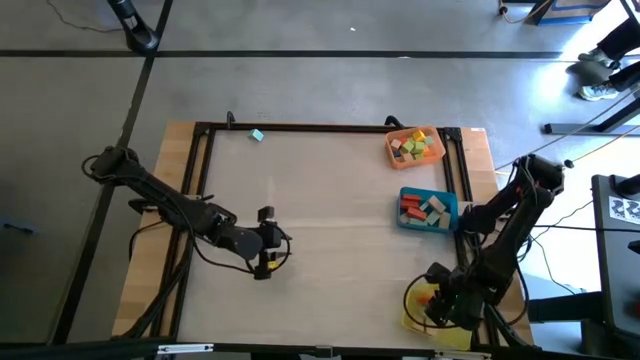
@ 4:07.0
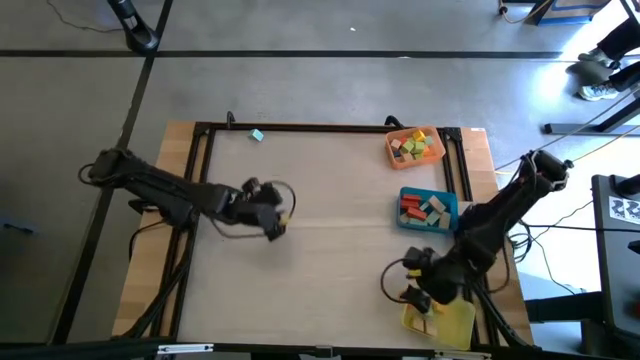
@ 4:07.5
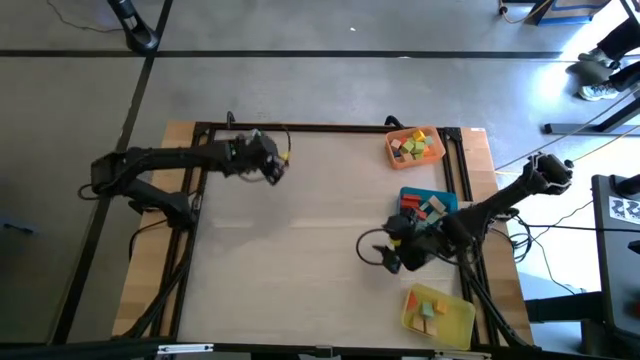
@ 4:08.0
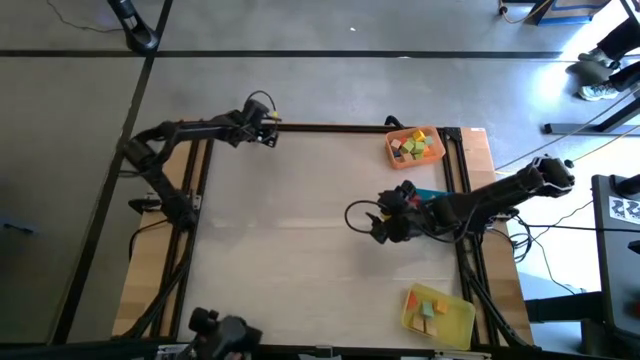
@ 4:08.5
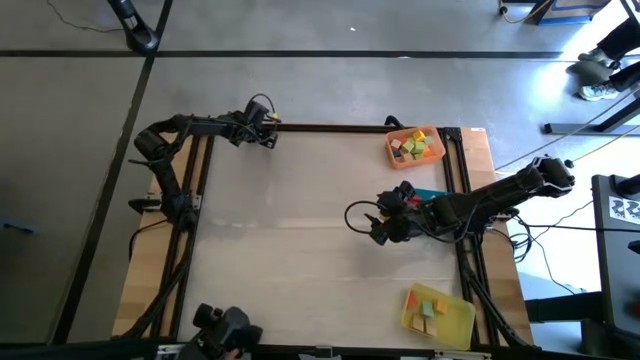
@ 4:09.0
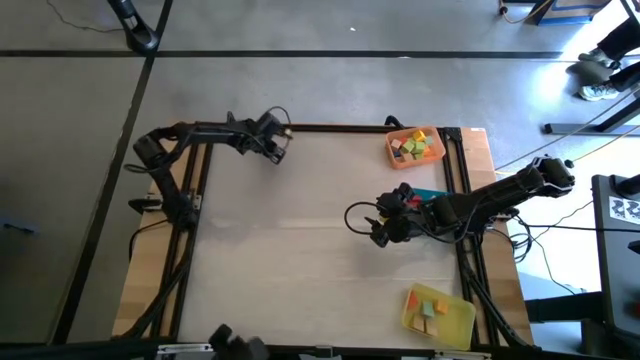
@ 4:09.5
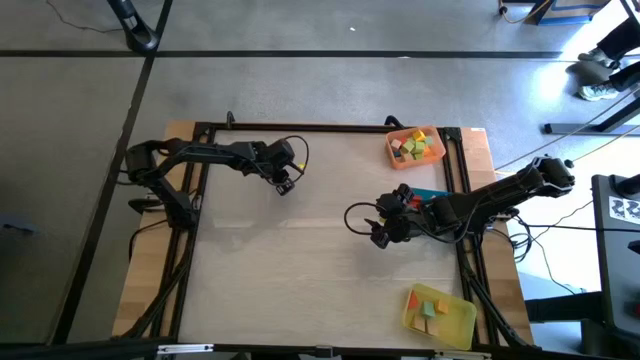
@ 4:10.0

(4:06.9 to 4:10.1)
Task: Sort blocks by size
Put the light blue triangular block into the yellow bin

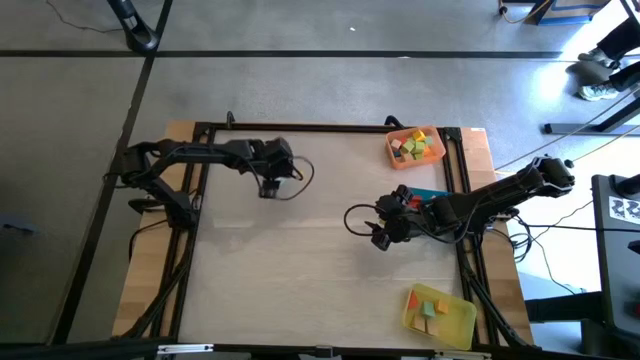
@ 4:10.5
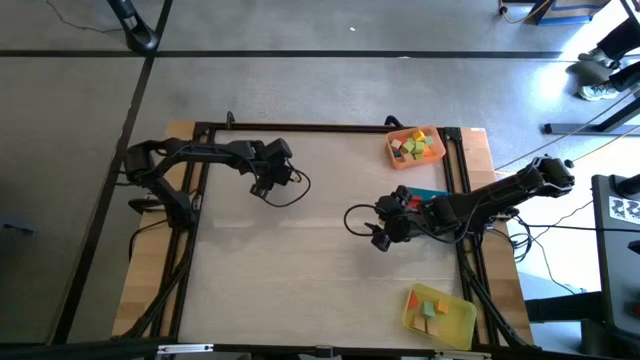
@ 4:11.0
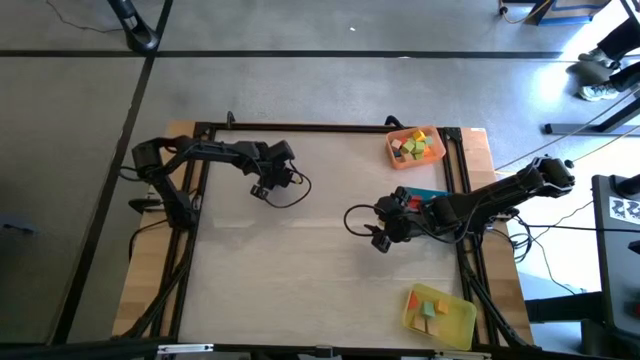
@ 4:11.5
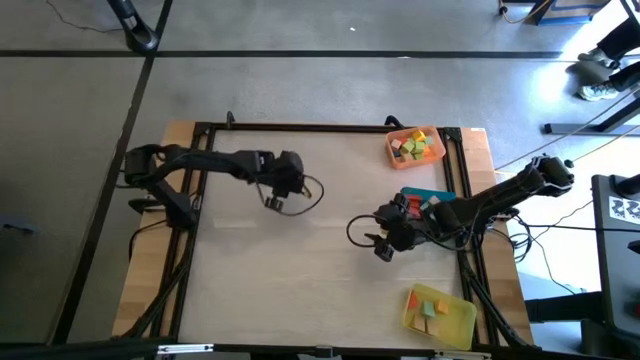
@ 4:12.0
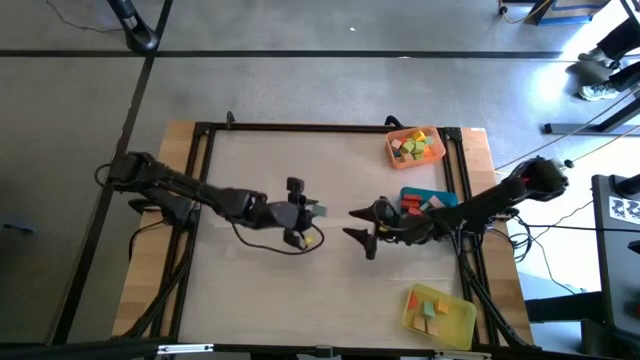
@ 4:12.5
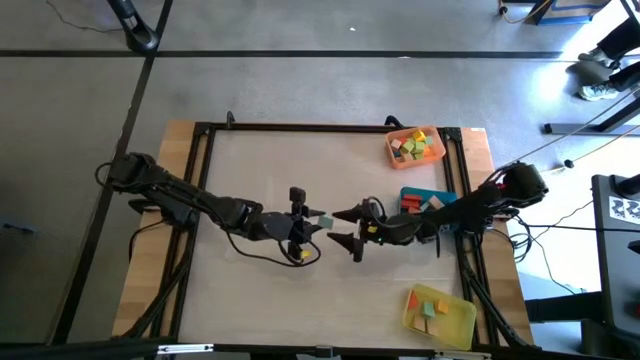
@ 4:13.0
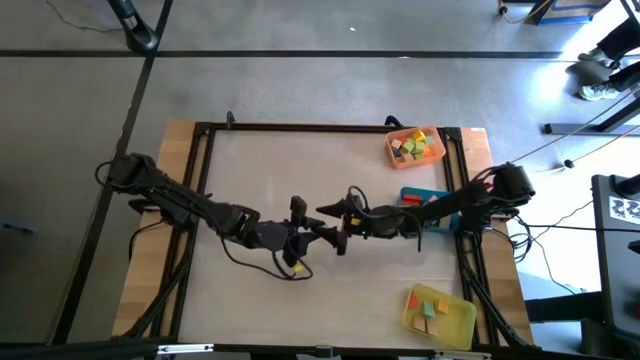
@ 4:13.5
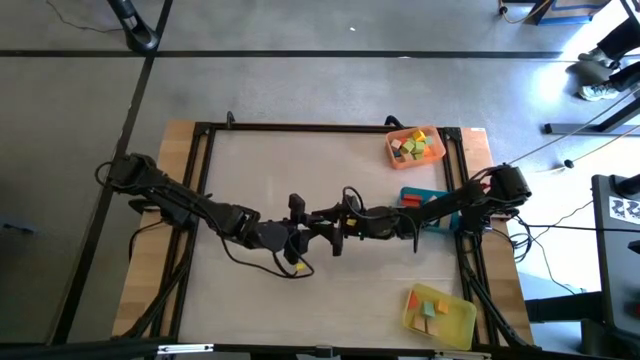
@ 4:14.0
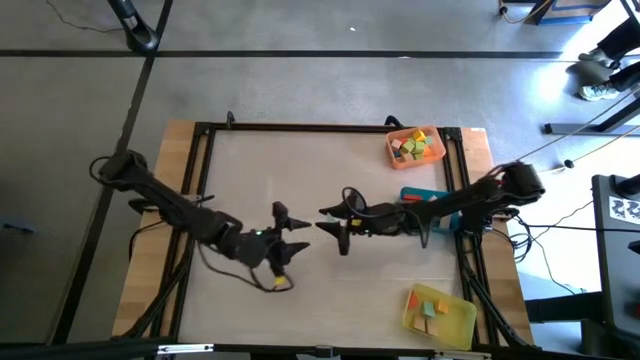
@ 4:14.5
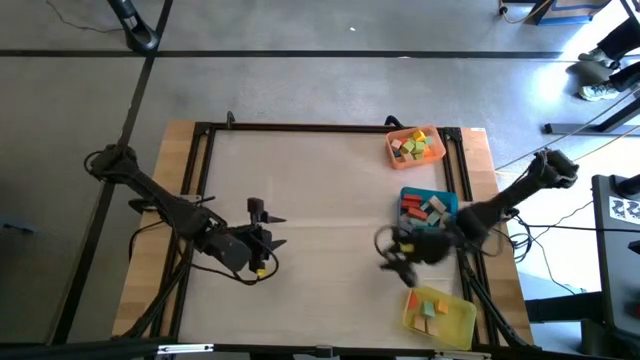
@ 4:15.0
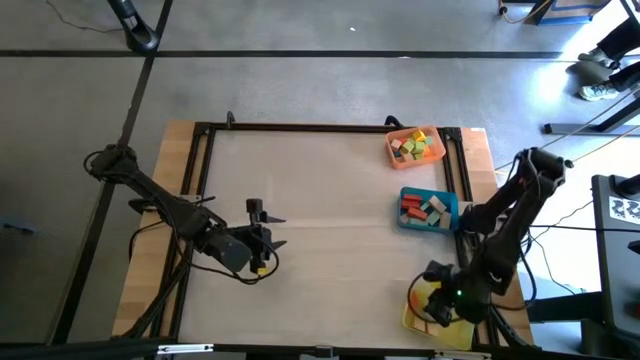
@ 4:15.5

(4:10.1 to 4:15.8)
Put the light blue triangular block into the yellow bin

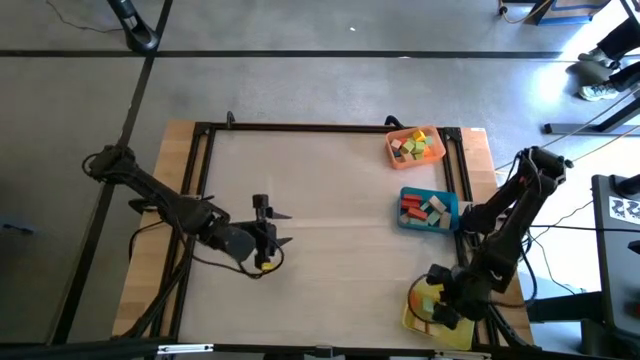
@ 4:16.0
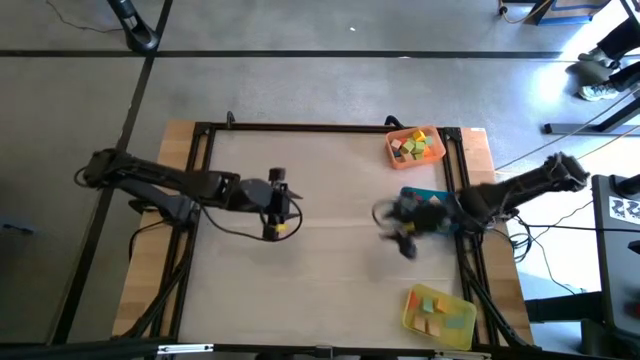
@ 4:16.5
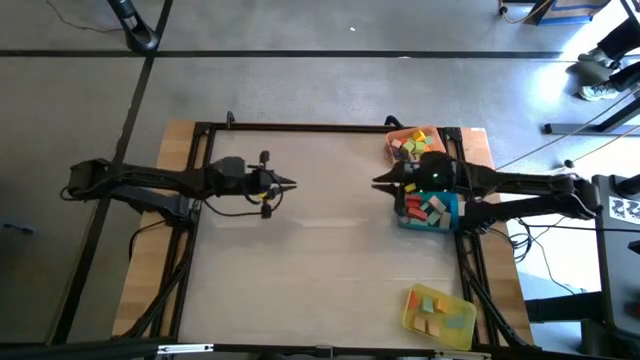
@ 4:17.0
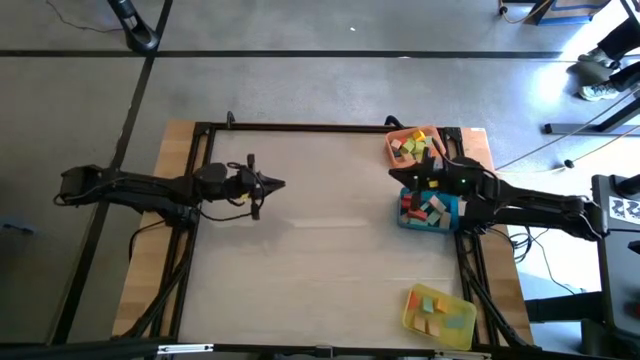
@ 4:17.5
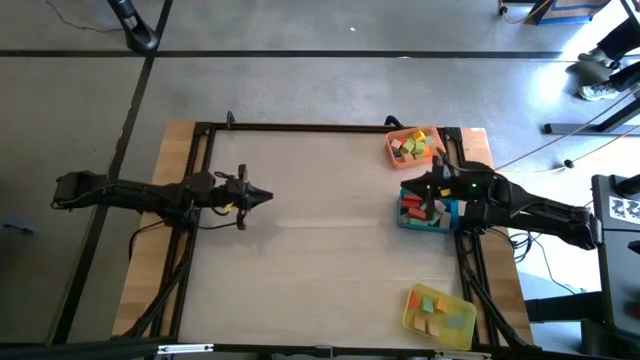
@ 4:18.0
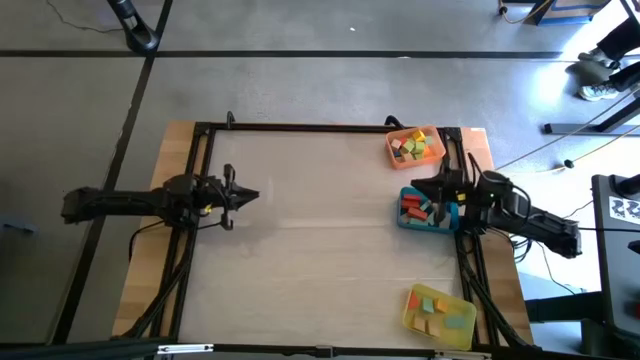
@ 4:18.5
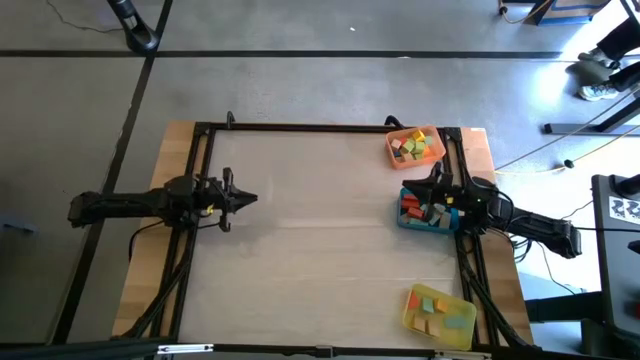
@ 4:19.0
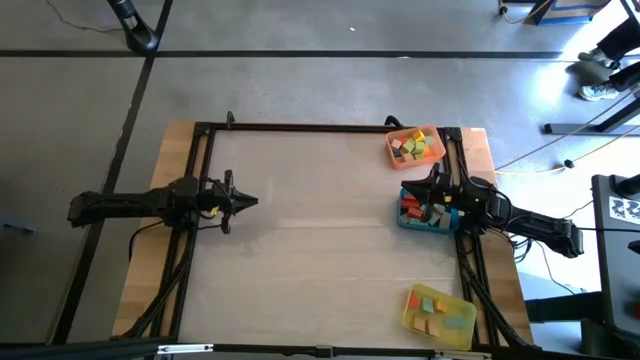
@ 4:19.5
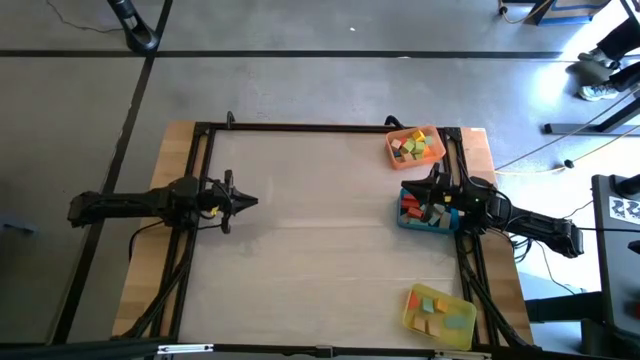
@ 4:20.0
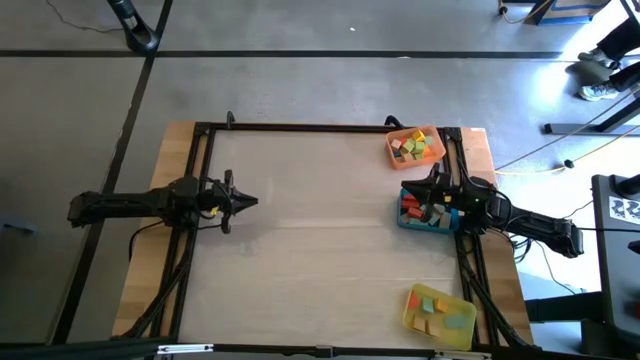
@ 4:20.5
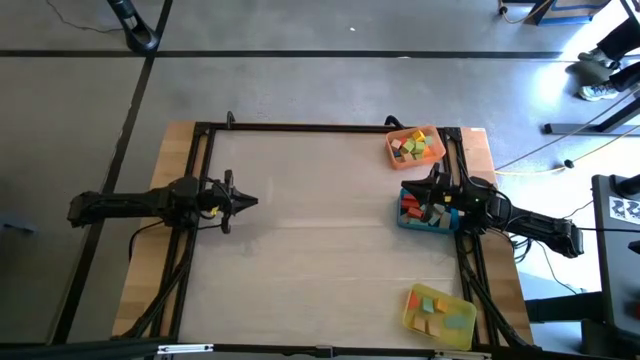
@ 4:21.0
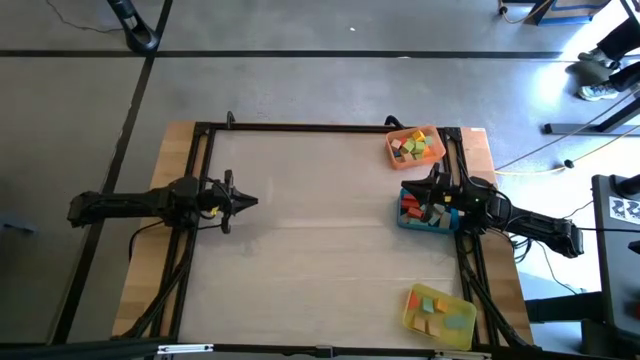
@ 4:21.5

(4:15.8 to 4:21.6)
Return to Home Position

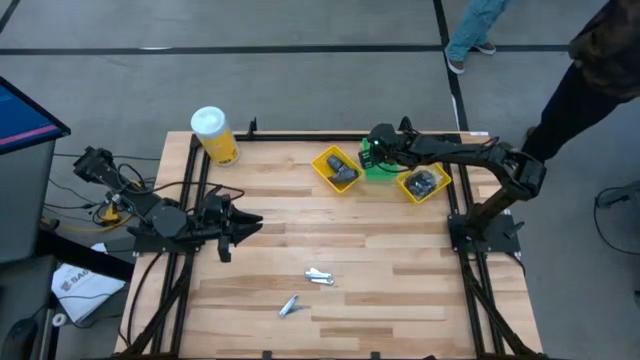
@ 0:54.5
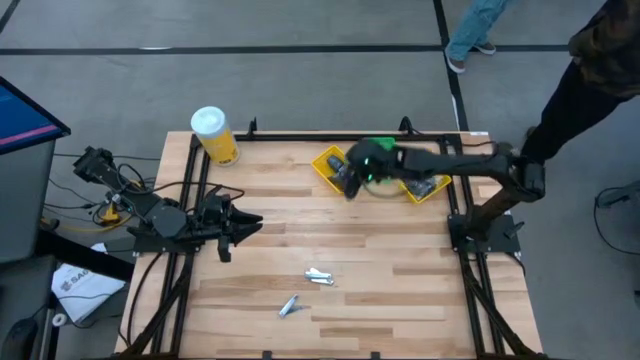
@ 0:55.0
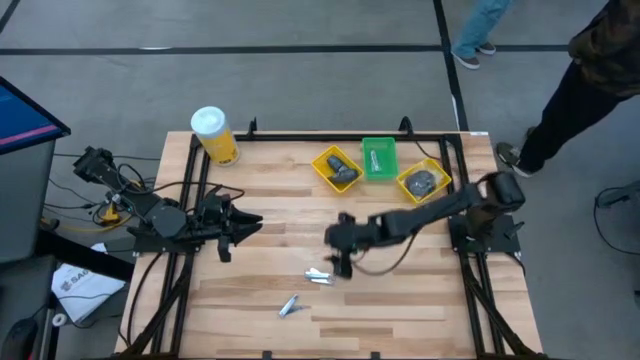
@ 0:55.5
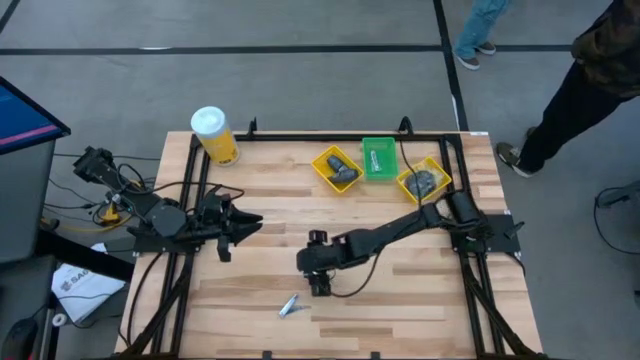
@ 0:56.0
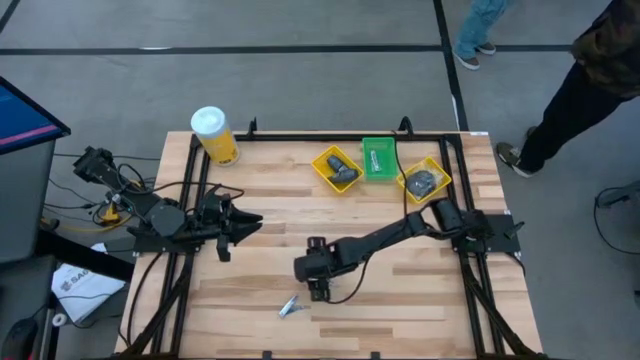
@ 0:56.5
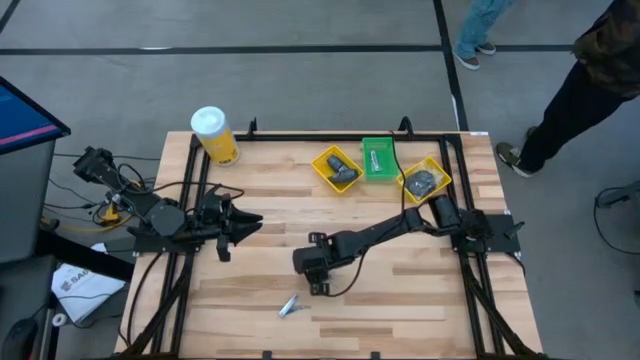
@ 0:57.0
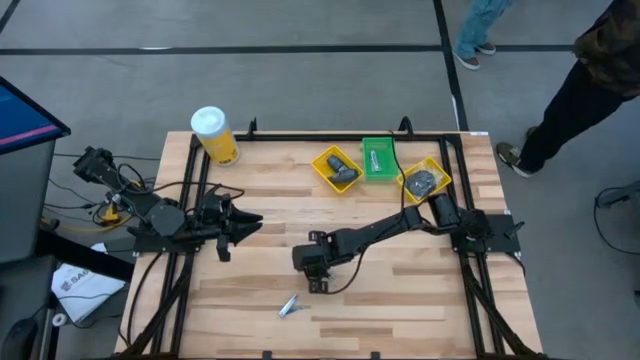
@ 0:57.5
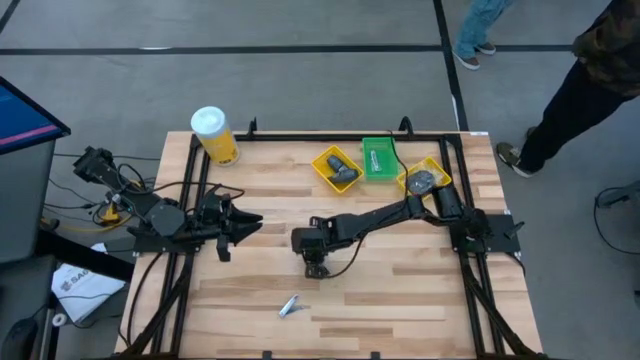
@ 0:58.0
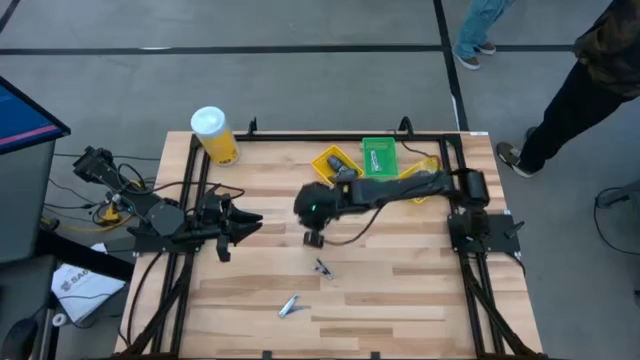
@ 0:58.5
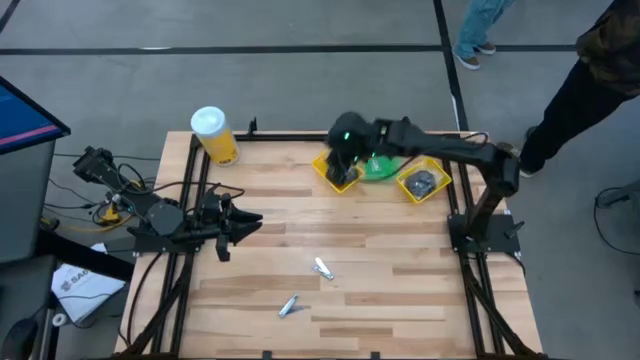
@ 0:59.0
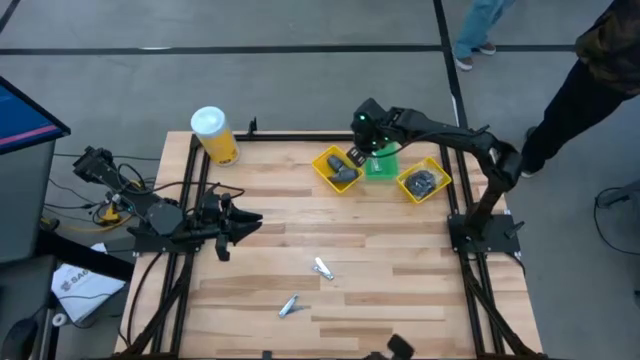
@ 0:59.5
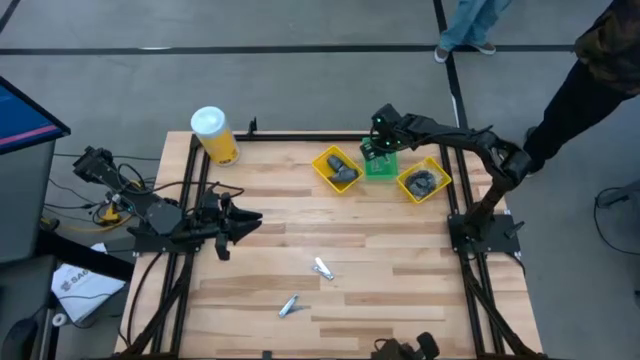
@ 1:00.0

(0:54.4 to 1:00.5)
Task: Pick & Place Travel size toiletries
Put the silver nail cutter into the green basket
